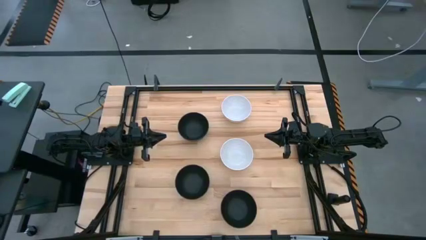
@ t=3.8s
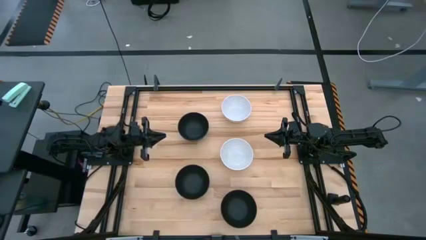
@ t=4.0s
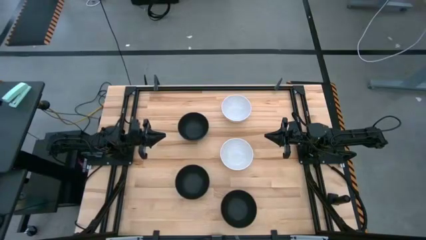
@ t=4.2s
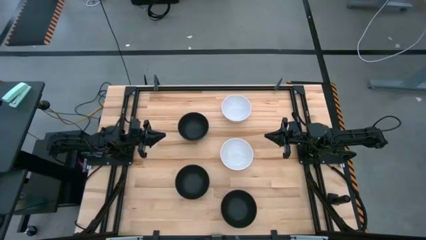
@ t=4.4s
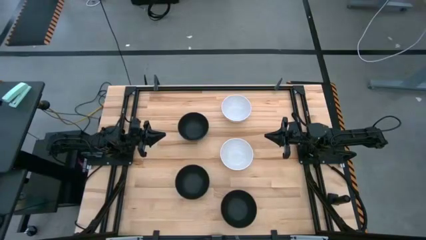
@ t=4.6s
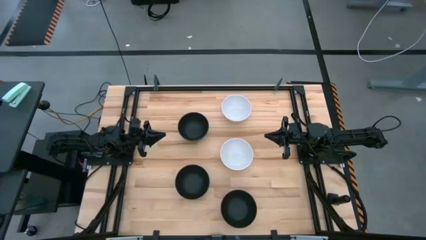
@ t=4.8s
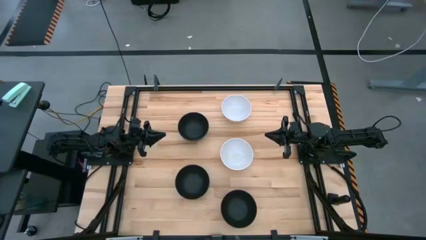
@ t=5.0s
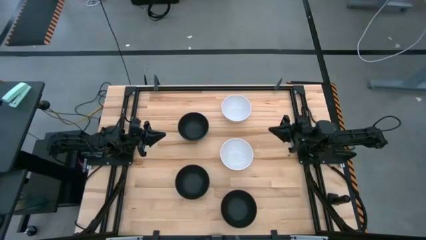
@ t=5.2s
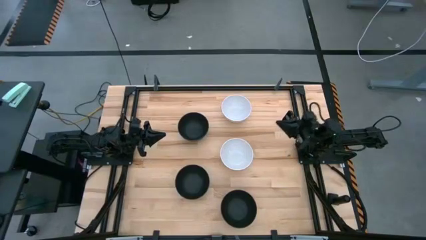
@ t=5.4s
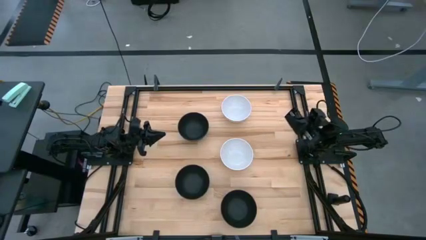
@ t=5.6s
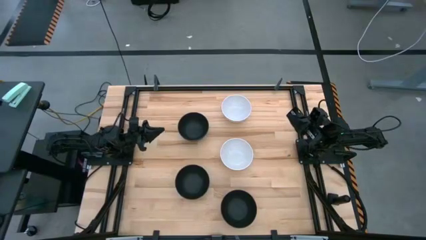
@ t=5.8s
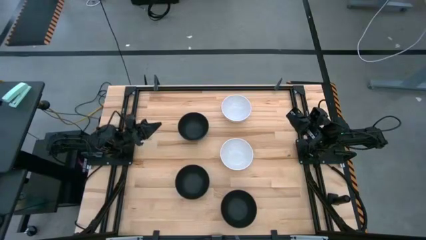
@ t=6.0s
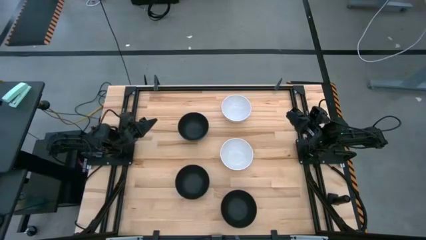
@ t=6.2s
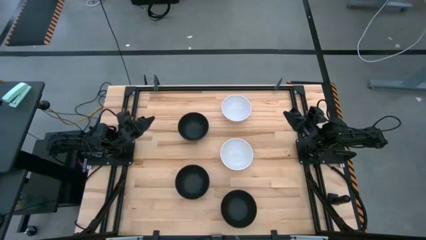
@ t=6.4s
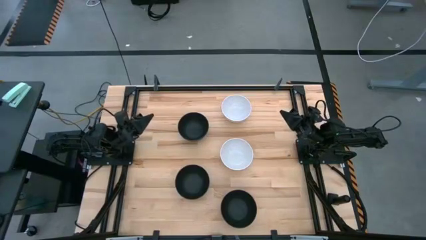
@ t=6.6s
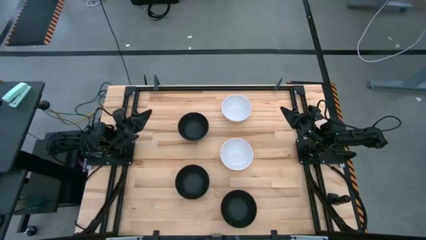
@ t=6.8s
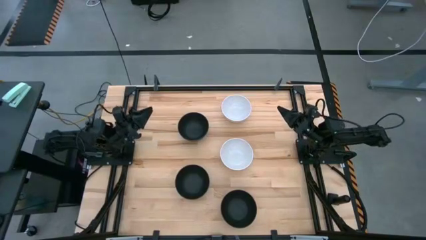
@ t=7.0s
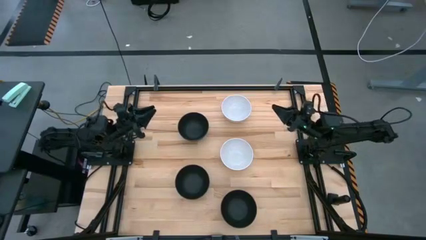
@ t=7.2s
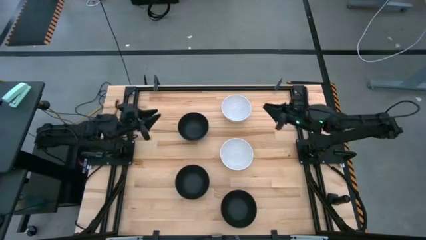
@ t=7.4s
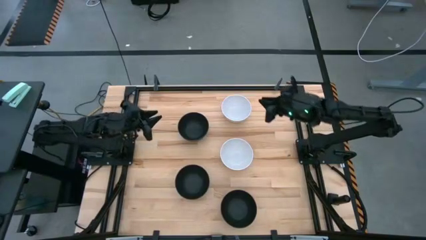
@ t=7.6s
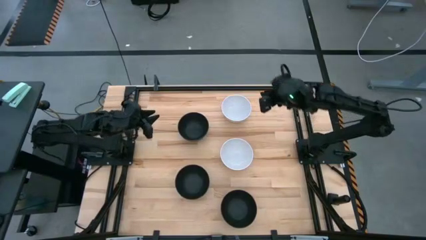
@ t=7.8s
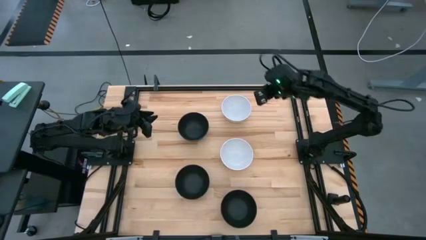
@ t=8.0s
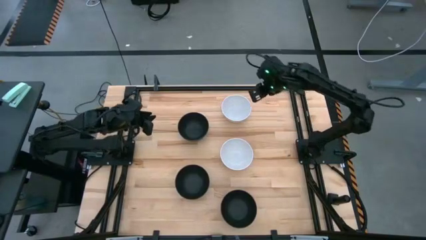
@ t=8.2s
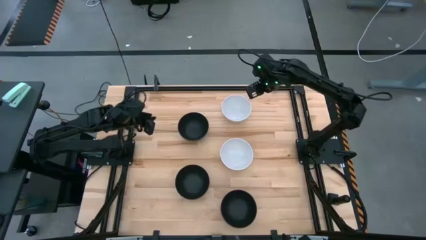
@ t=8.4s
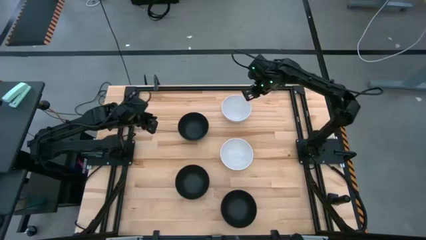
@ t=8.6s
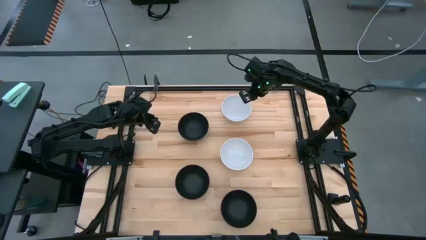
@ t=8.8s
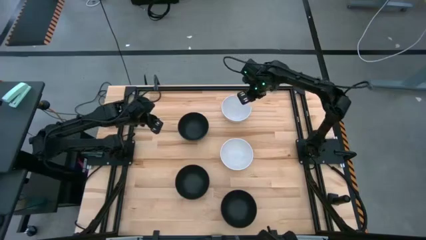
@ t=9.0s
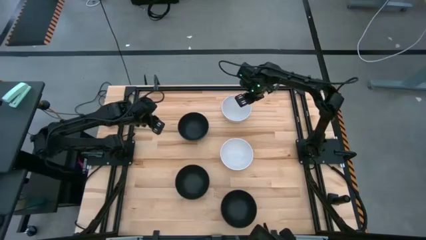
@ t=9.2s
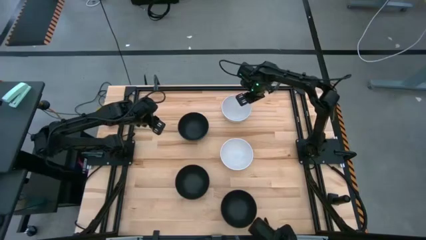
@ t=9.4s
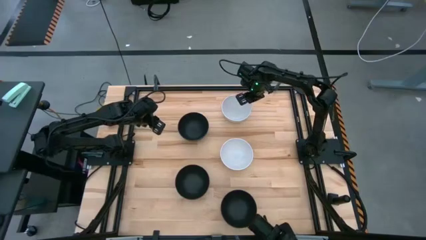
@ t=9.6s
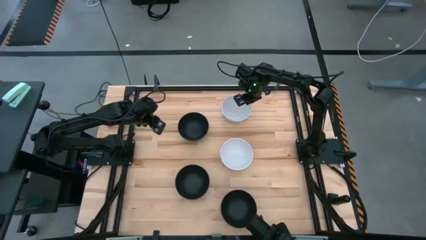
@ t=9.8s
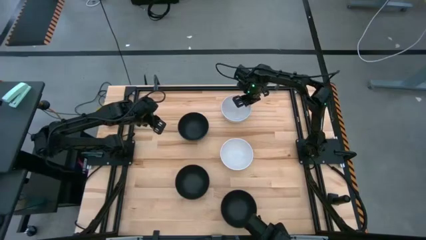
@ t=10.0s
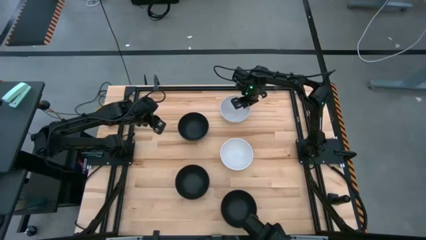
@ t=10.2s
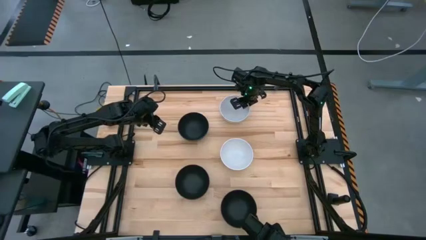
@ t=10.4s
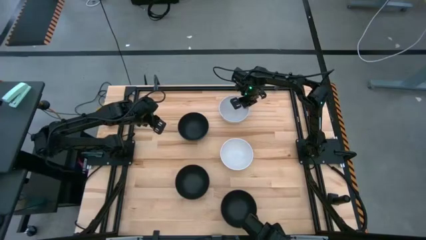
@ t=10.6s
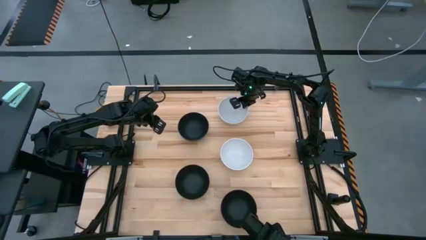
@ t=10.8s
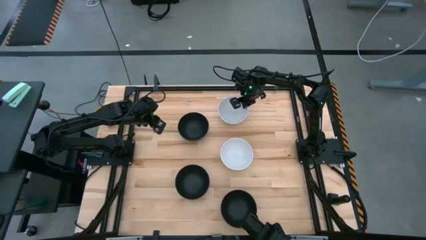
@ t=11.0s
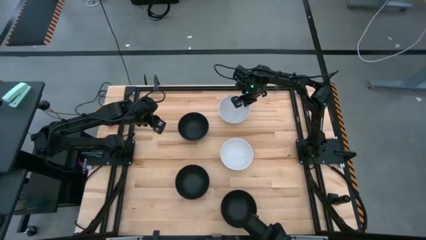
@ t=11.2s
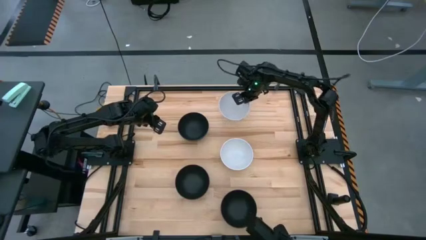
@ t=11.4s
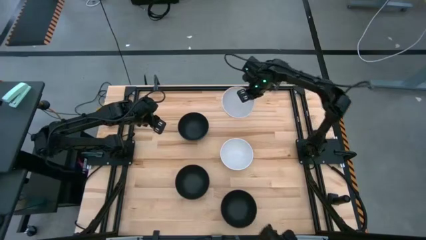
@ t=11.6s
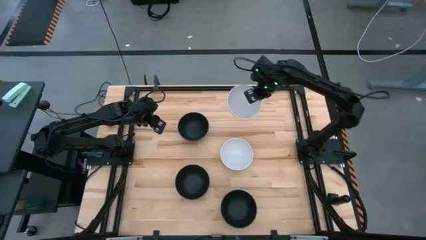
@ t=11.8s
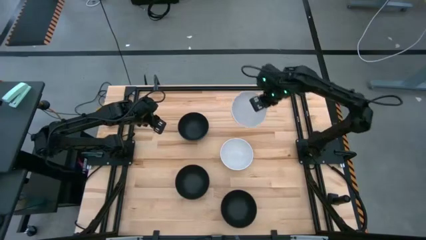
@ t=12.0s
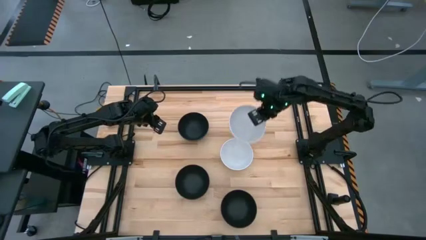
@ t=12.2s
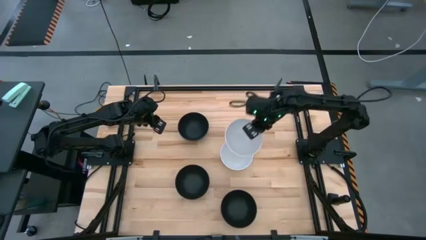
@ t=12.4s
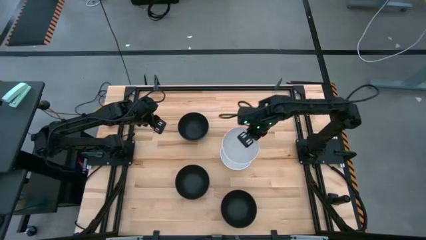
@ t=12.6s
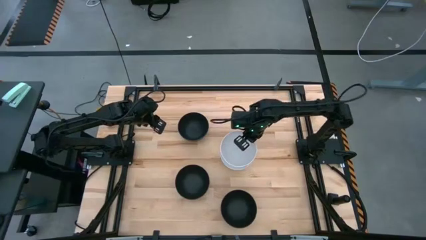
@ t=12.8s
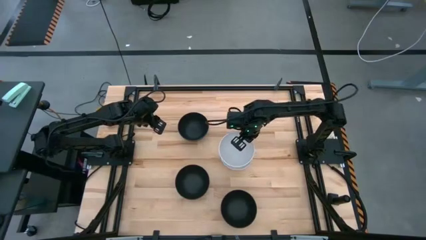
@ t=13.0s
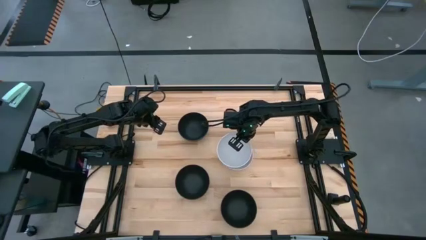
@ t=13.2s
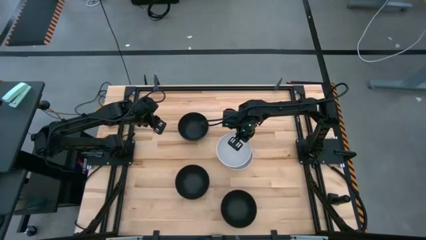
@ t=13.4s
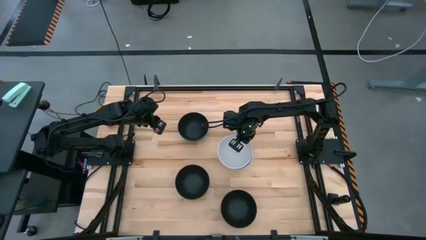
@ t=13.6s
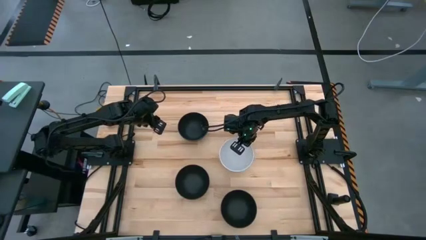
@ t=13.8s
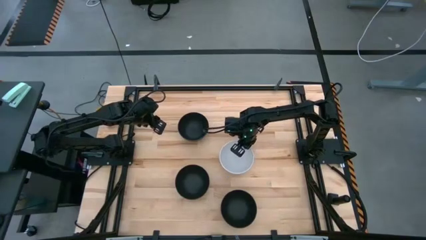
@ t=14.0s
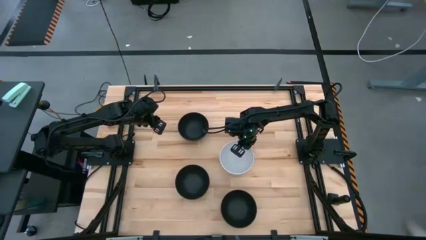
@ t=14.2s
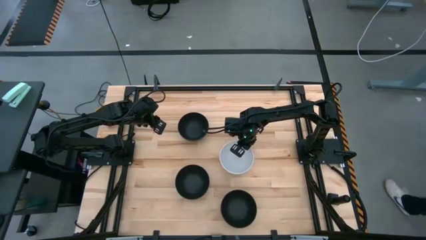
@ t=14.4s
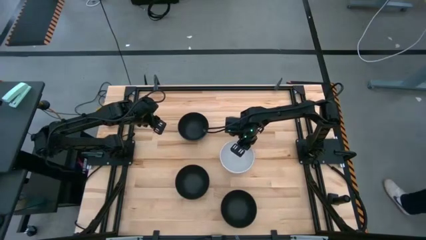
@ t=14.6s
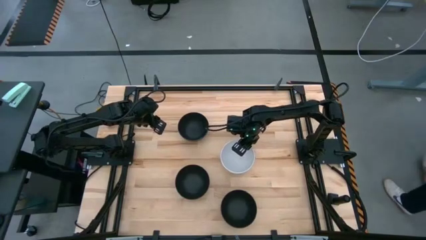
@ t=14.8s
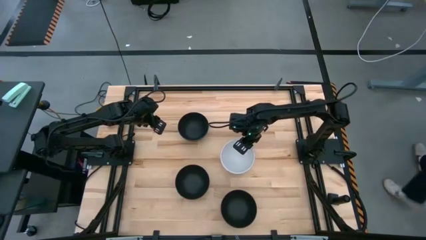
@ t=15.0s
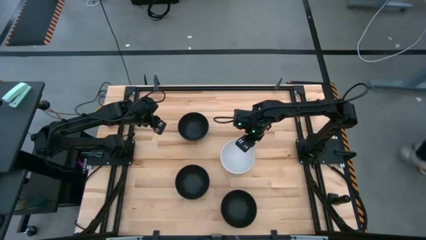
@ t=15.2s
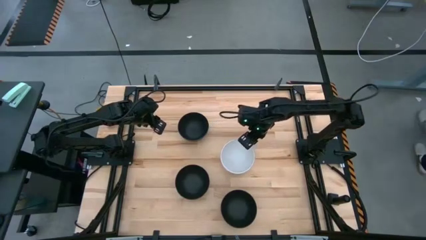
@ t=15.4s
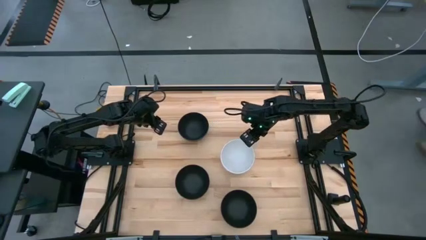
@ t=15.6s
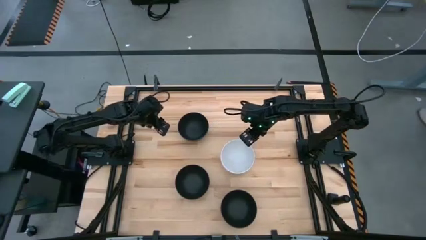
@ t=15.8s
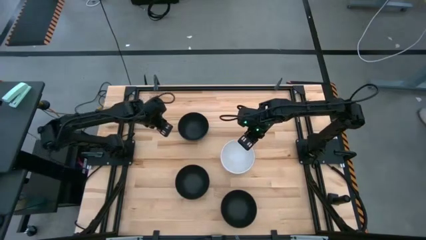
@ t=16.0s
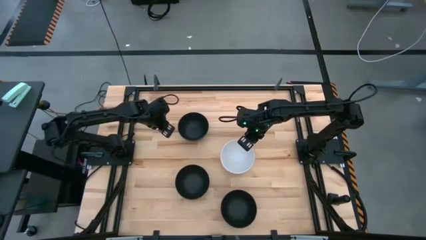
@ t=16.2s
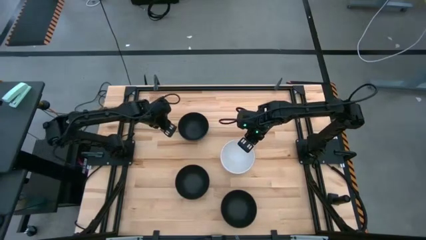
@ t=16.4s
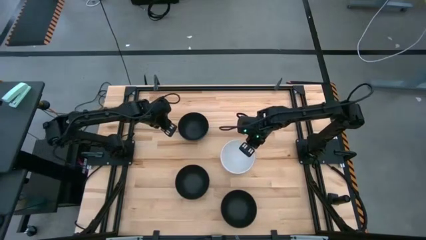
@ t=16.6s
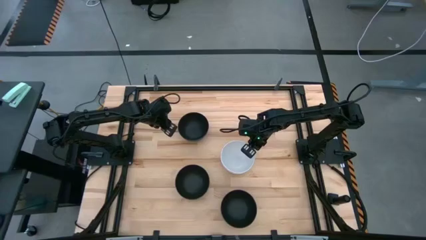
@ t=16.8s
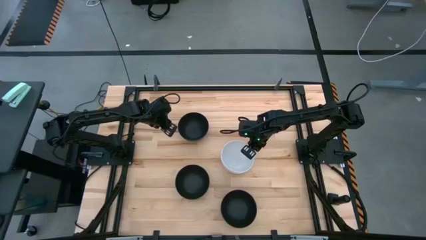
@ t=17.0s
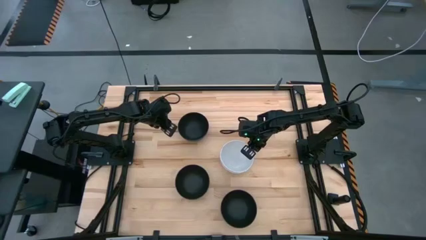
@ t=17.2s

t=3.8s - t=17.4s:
Task: Nest bowls inside each other
Stack the top white bowl on the white bowl

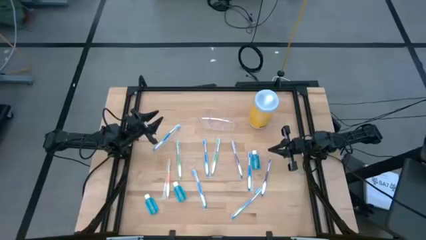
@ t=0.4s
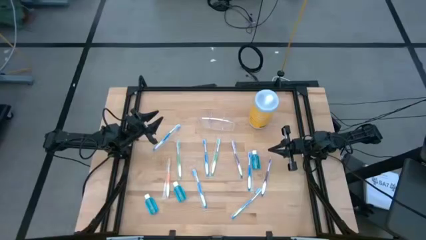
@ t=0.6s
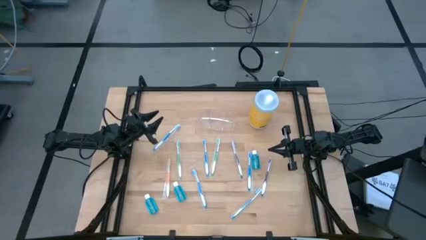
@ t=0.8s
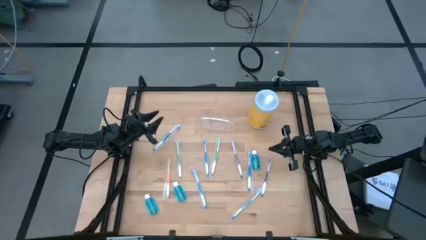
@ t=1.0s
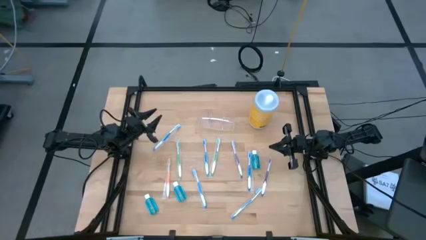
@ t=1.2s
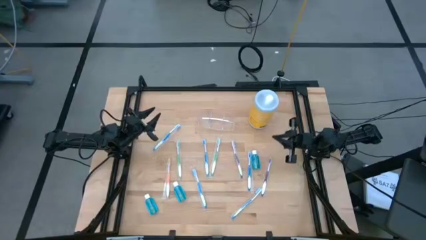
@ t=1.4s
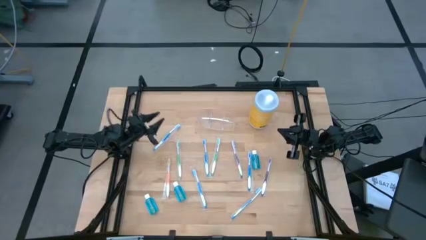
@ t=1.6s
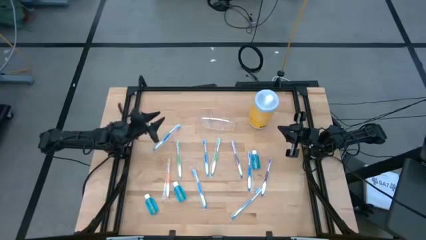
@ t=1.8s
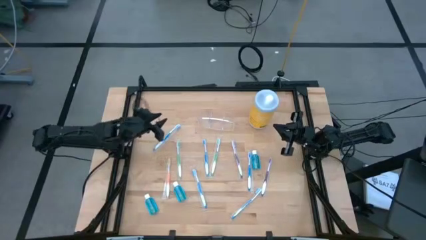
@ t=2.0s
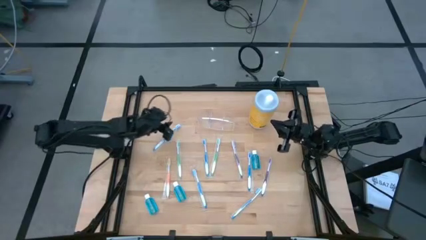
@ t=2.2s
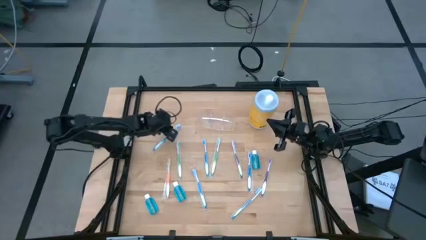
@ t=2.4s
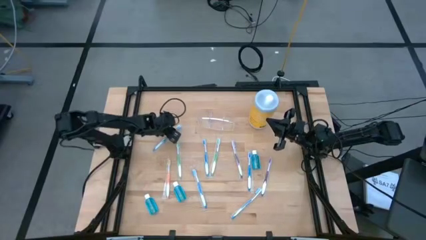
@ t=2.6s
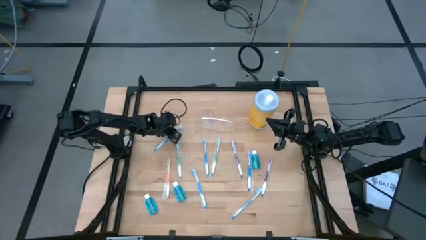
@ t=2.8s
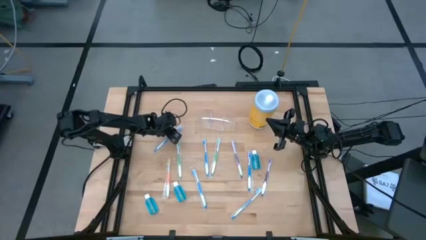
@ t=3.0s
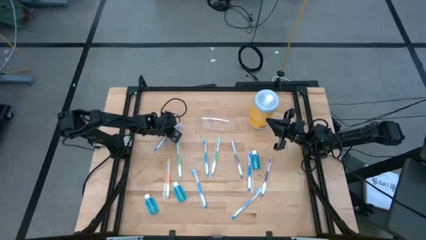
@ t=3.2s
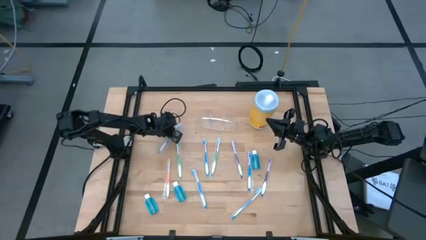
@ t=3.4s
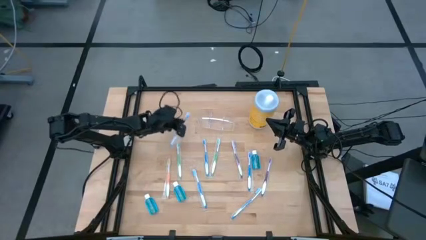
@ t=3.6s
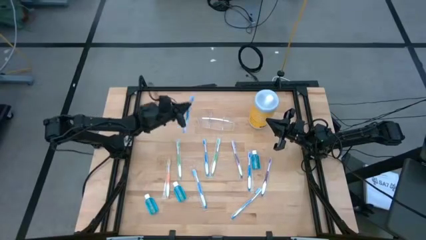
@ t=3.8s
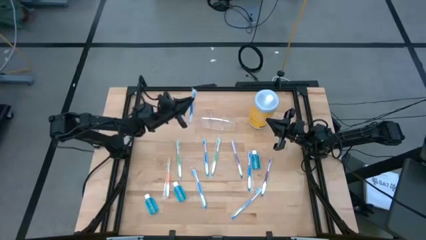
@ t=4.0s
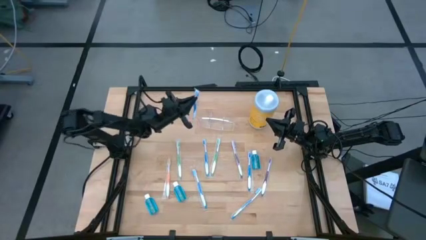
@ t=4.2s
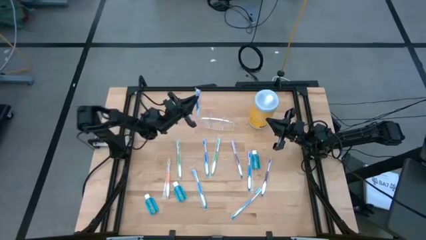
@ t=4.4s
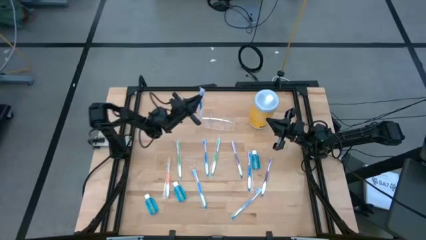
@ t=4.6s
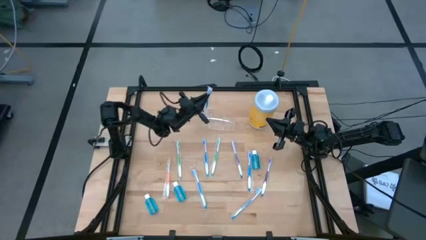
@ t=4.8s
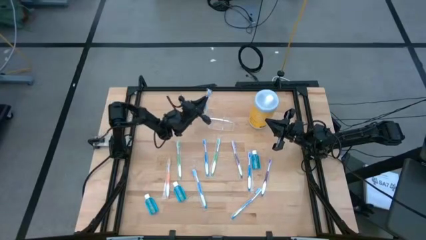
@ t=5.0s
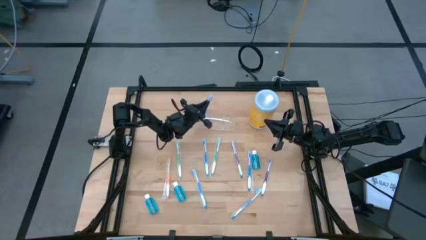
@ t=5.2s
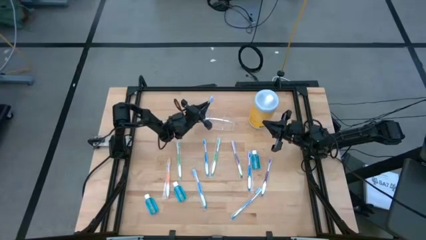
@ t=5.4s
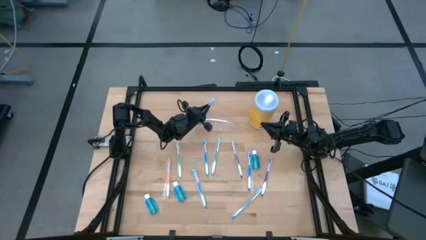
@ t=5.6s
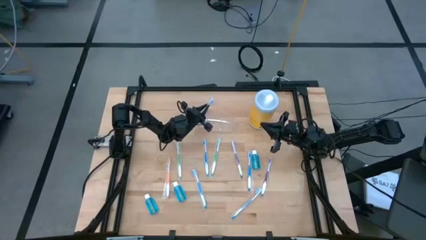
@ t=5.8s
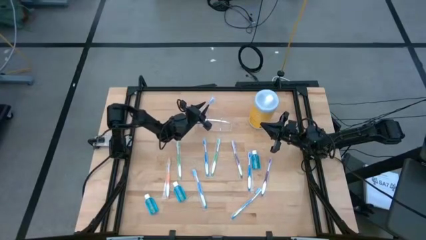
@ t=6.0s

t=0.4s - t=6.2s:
Task: Pick & Place toothbrushing station
Put the blue toothbrush into the left compartment of the transparent organizer
